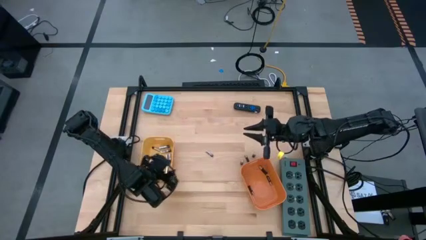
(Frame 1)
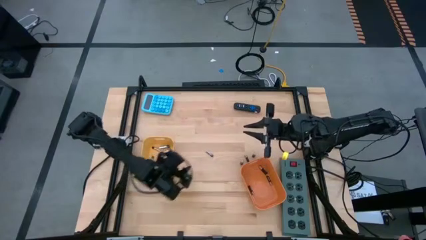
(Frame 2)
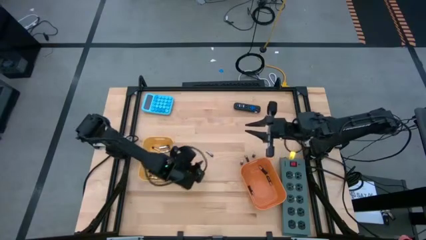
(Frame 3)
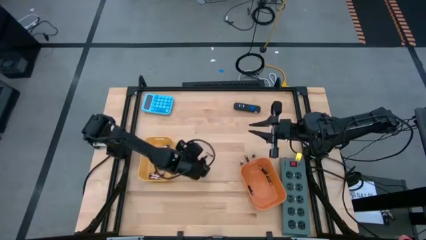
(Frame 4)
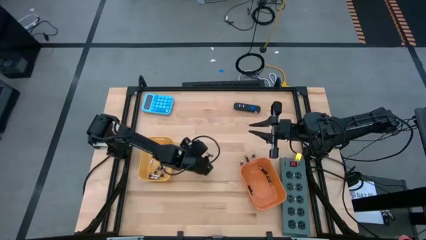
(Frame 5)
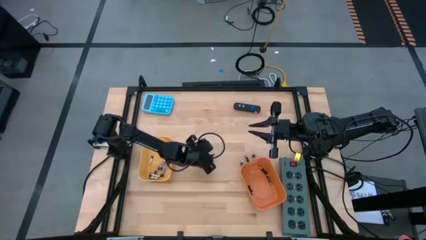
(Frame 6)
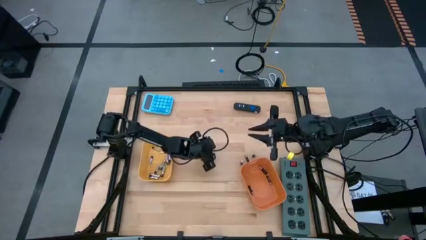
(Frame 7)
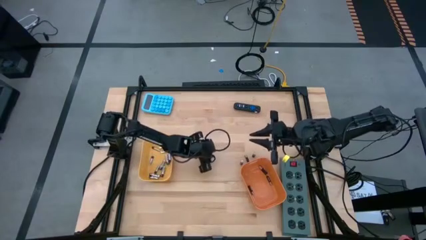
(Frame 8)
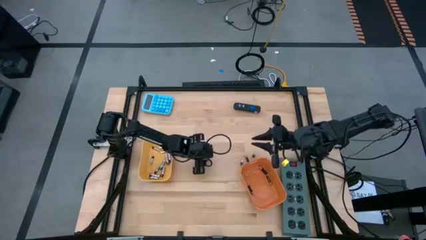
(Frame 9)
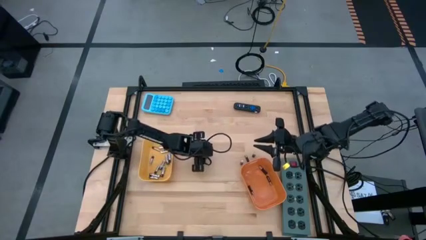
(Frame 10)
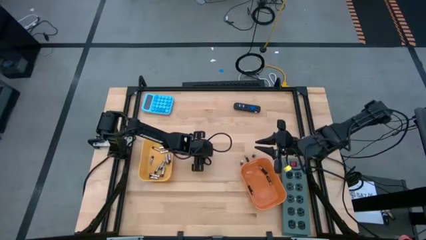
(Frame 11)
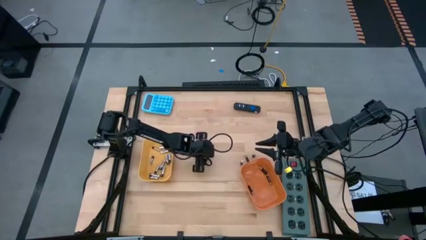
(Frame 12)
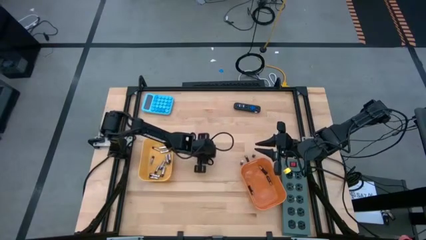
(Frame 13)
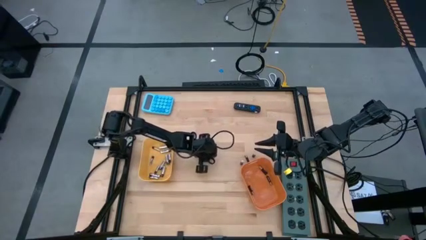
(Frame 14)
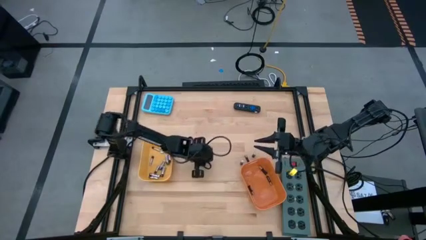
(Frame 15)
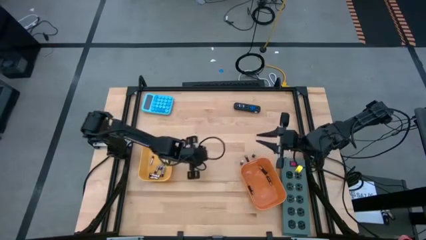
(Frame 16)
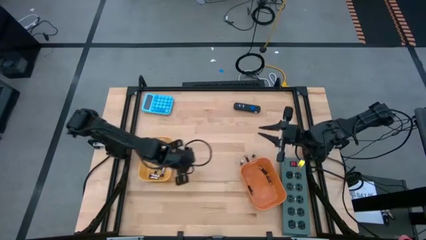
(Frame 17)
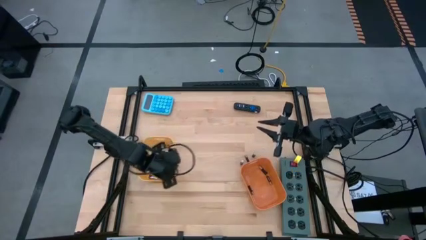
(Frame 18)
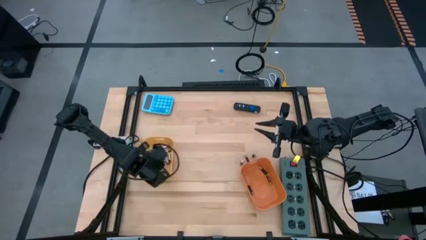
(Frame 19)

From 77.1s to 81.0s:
Task: Sort batteries
Put the silver battery into the yellow bin

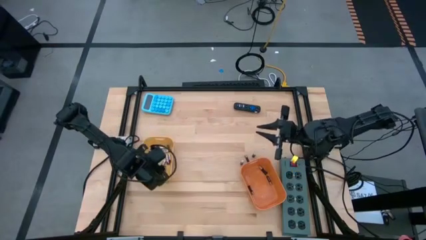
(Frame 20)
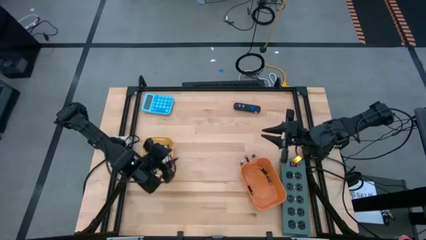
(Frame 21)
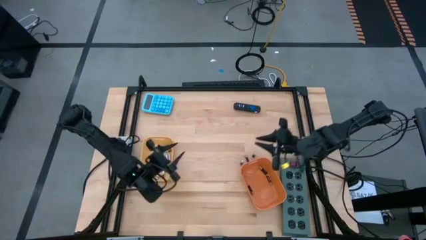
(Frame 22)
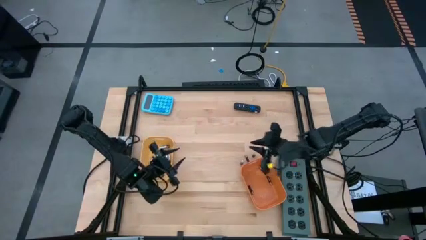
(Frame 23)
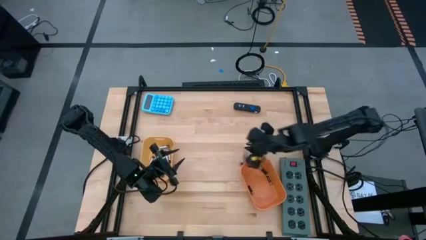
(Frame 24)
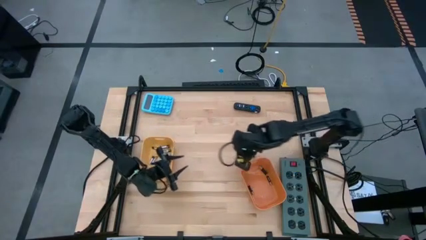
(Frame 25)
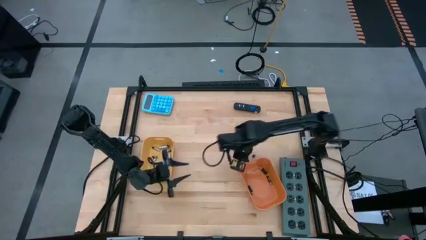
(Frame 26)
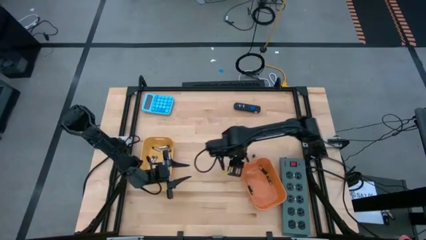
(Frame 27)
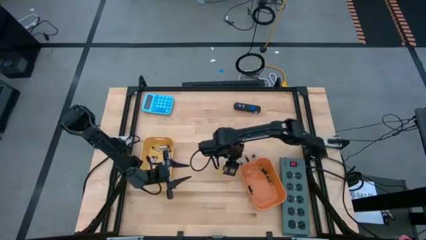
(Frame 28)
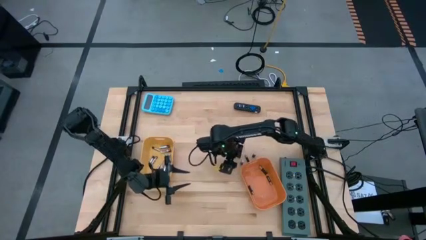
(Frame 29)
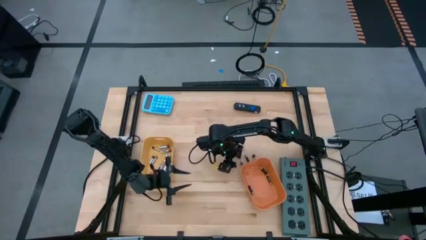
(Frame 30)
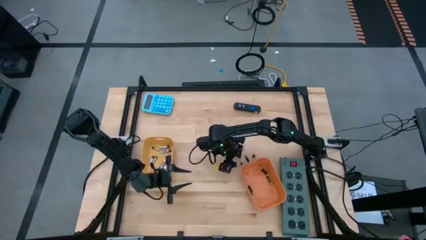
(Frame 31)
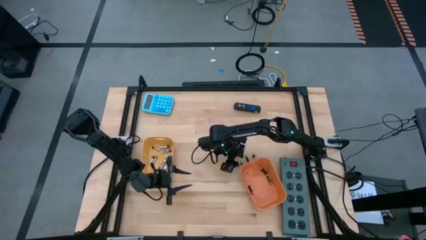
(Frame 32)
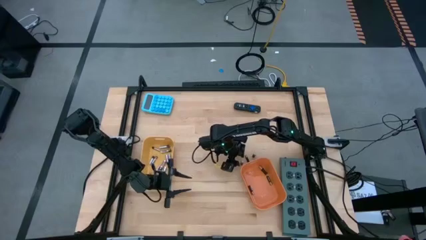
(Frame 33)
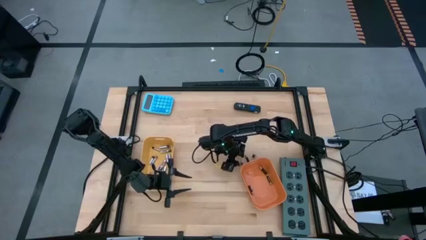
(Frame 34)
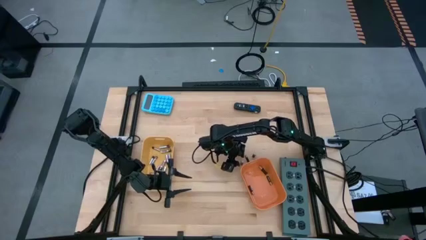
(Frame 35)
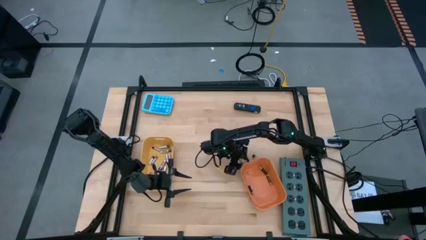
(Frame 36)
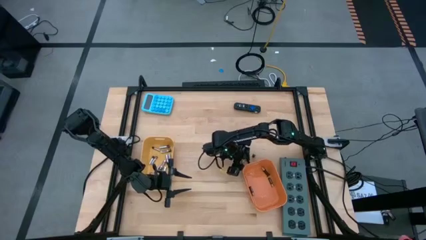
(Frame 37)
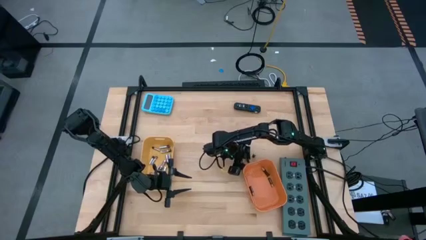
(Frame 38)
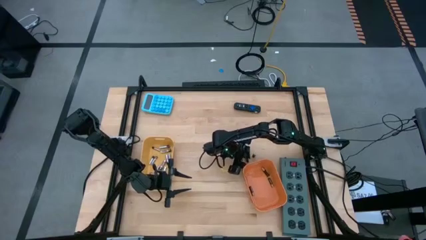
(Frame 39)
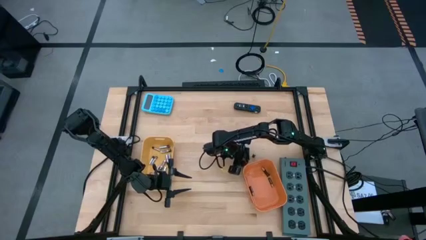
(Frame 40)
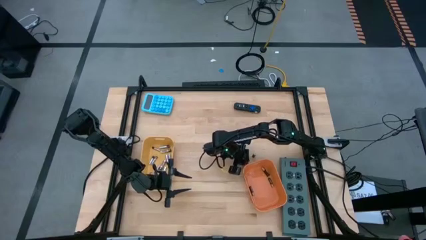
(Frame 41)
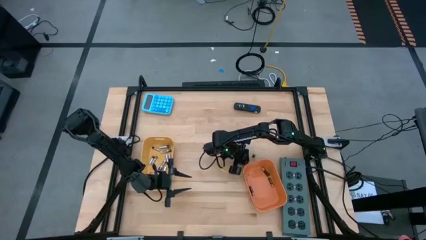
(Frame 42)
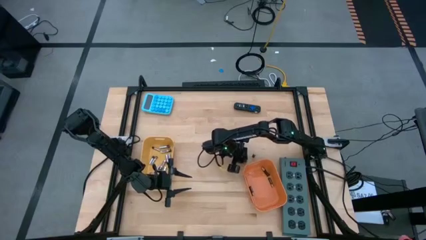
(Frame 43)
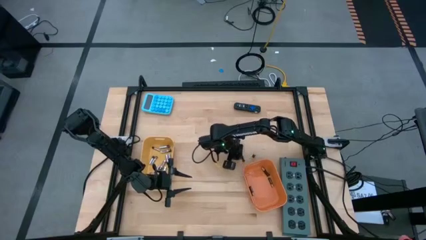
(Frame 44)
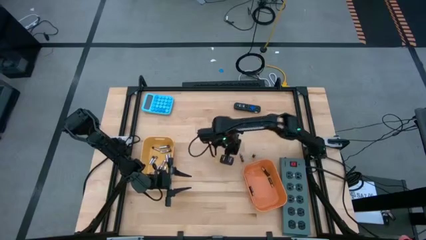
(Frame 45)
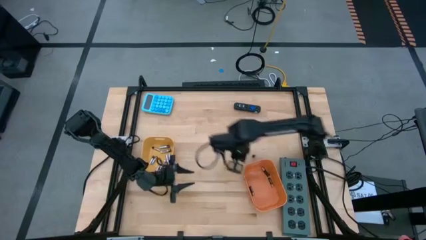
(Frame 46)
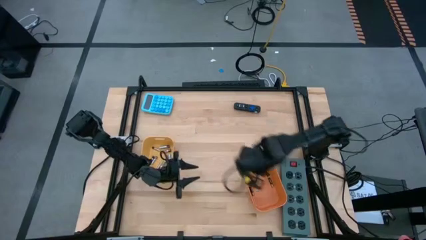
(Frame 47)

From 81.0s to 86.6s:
Put the black battery into the orange bin

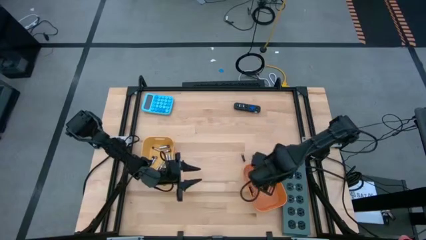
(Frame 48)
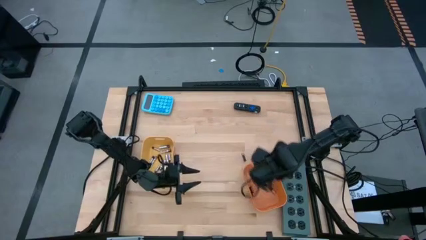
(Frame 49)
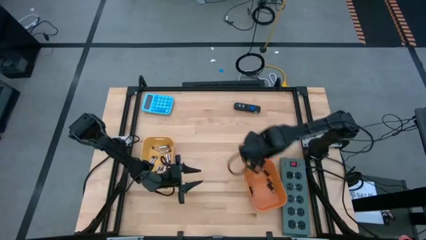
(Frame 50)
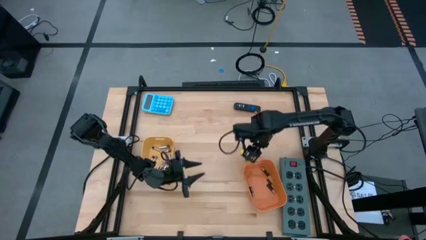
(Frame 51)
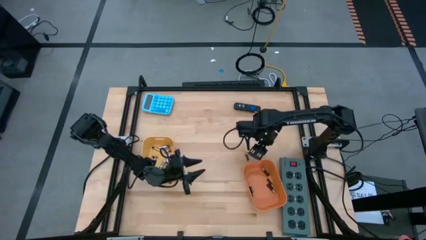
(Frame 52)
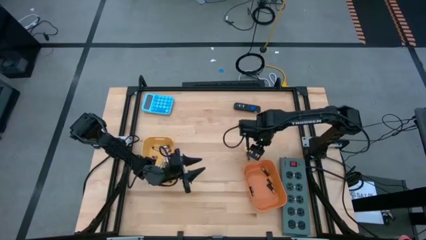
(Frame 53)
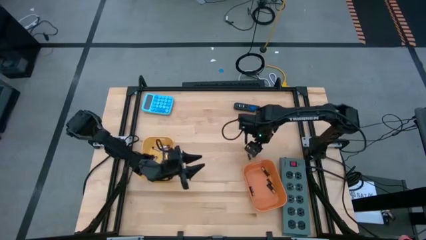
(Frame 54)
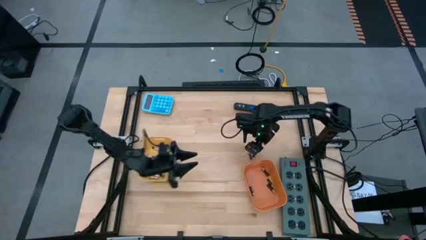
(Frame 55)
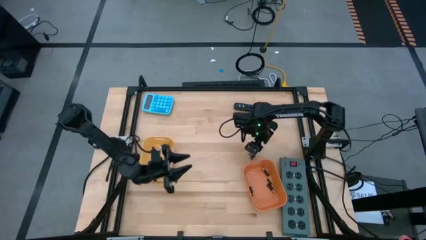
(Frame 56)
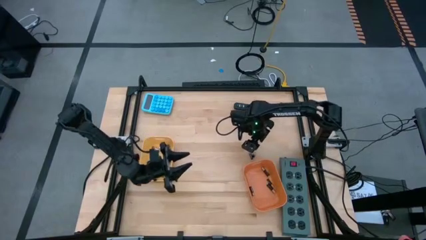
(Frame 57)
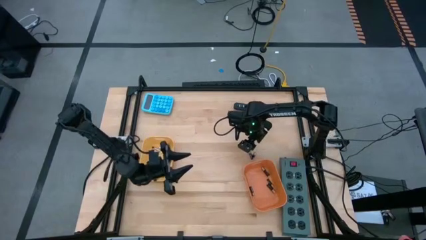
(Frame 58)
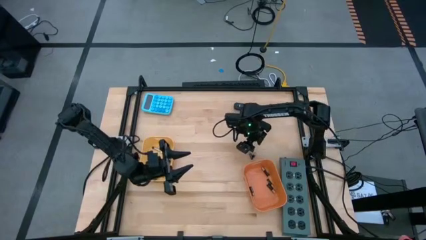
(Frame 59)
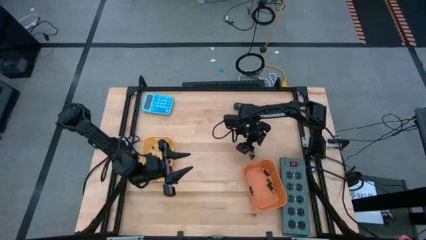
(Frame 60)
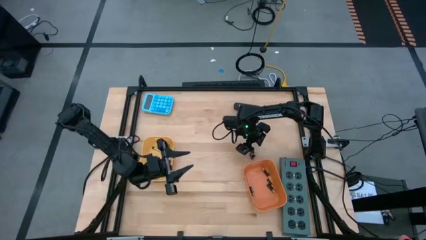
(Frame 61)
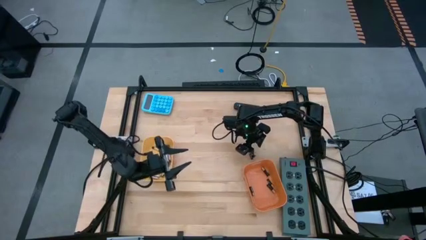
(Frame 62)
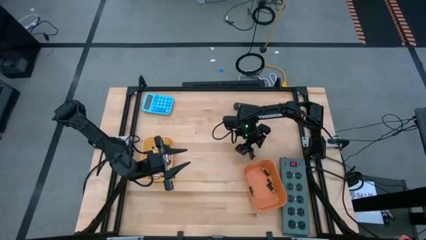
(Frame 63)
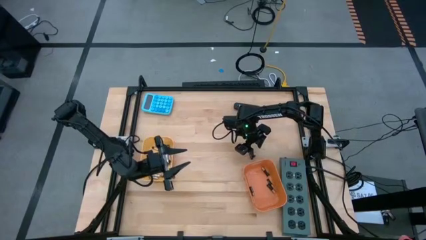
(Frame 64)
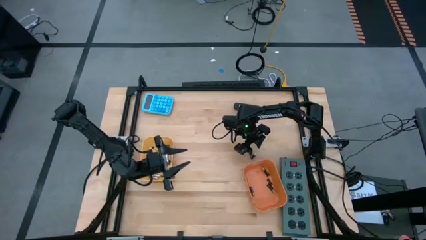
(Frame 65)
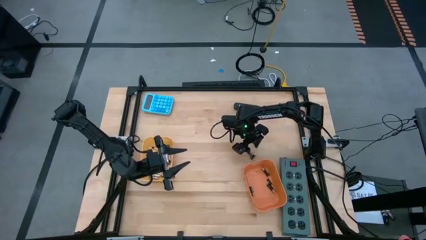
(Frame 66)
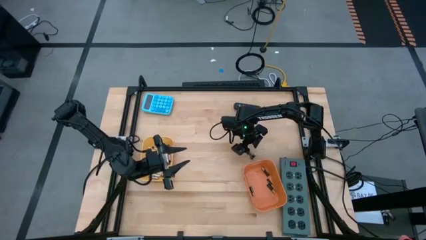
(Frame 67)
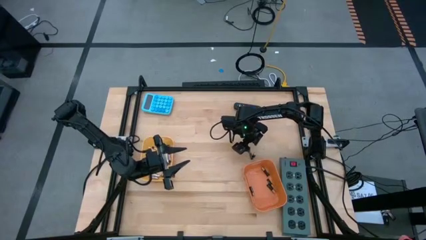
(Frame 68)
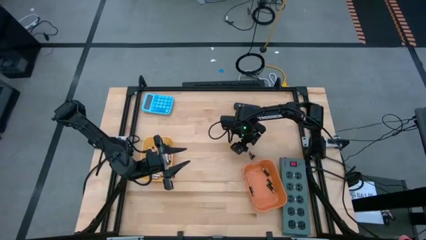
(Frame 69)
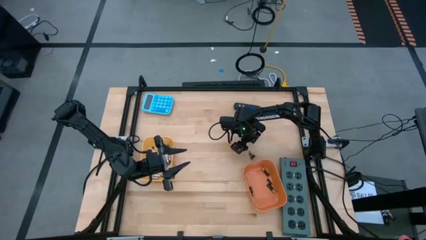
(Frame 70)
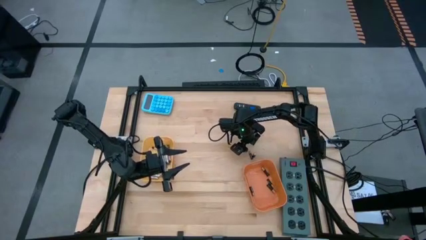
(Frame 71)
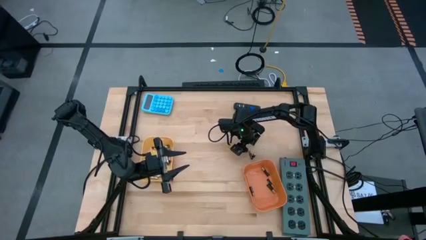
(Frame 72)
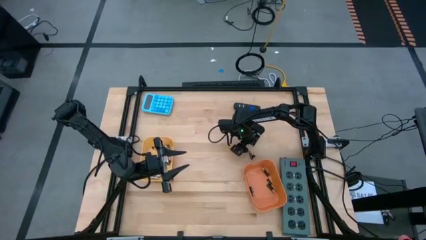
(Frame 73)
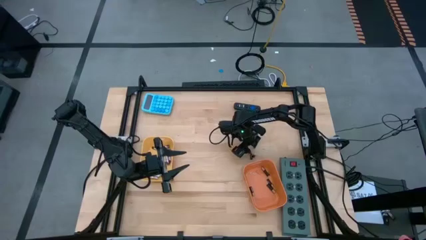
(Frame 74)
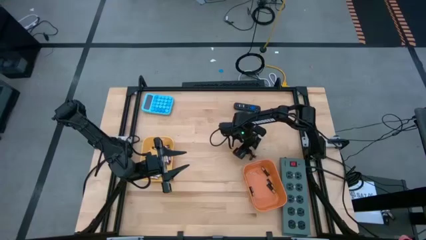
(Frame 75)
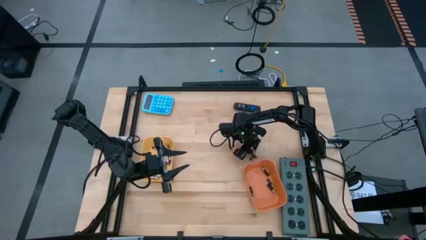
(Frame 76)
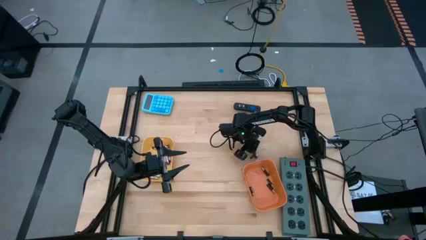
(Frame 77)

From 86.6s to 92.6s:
Put the black battery into the orange bin
